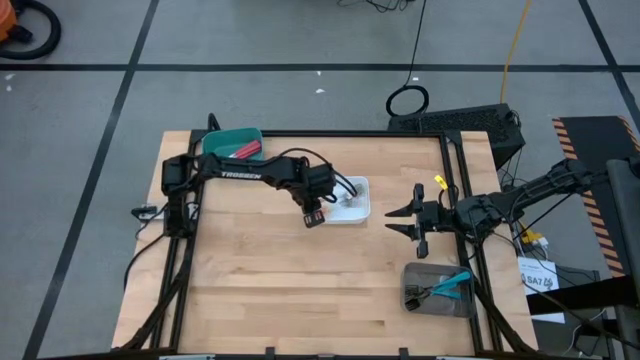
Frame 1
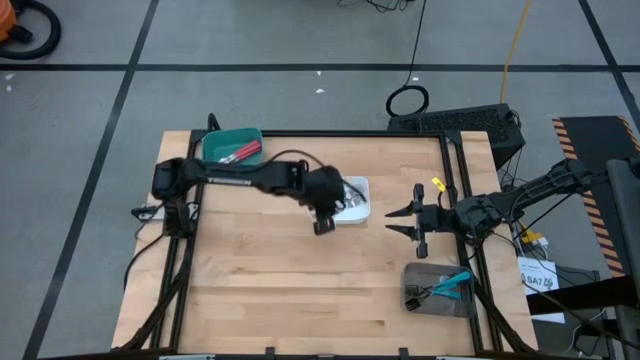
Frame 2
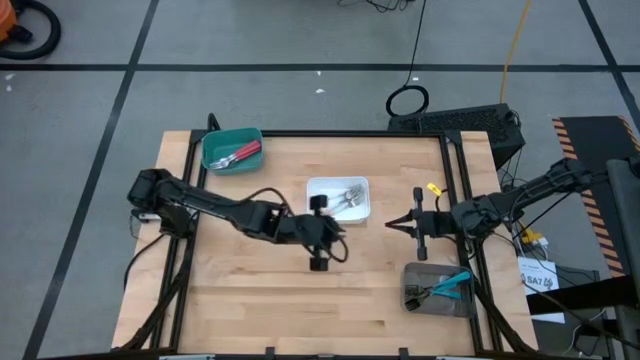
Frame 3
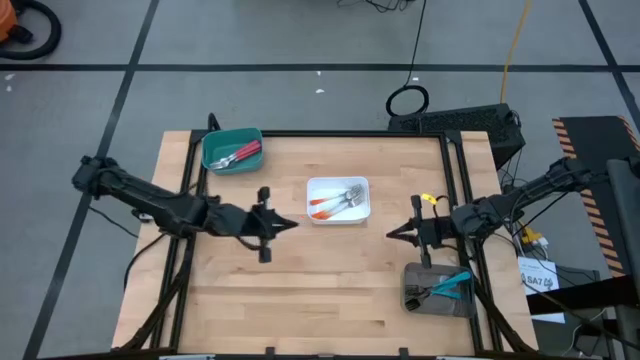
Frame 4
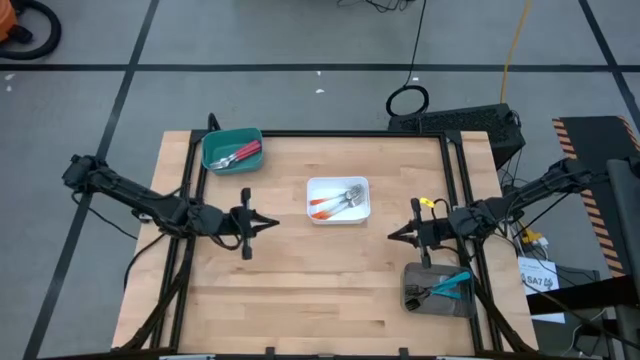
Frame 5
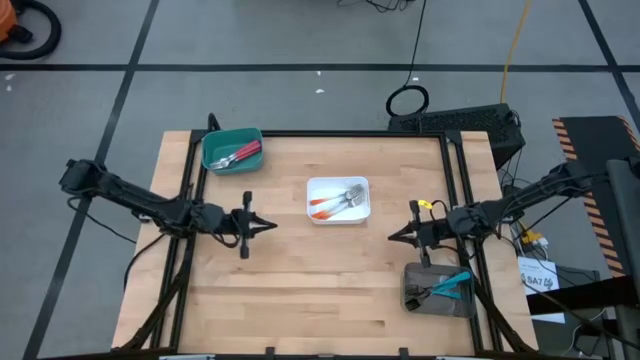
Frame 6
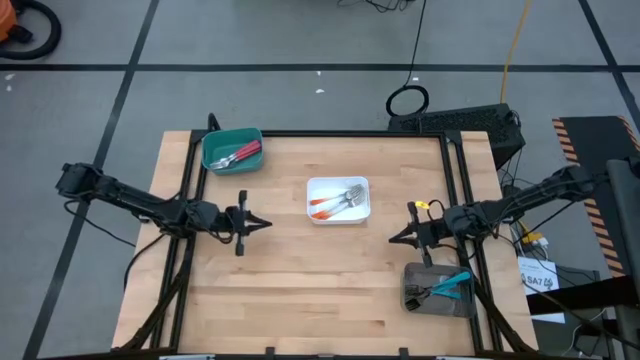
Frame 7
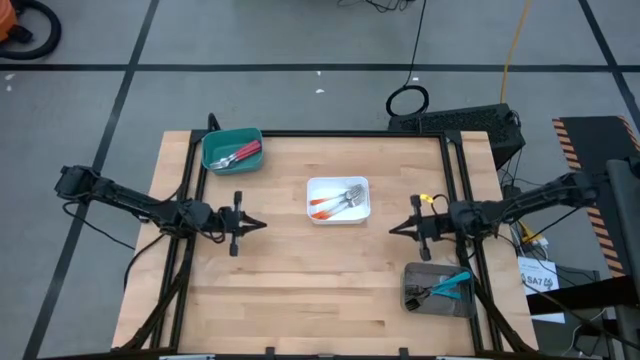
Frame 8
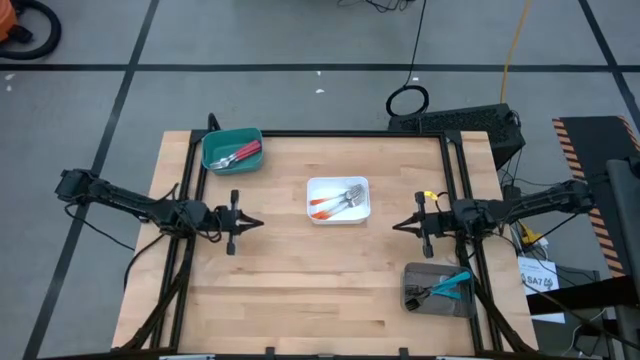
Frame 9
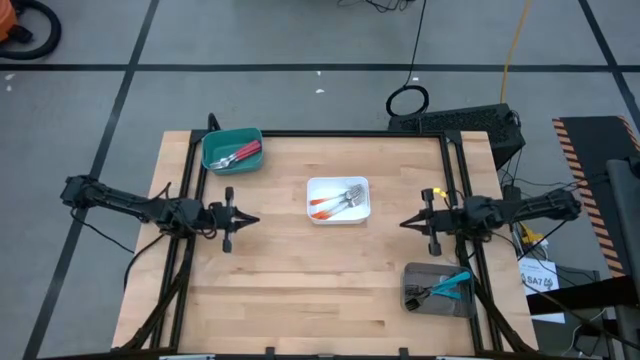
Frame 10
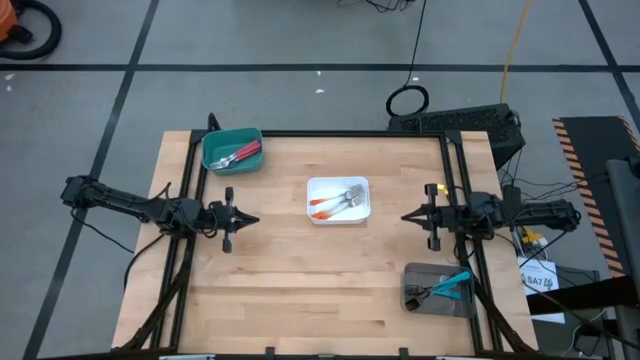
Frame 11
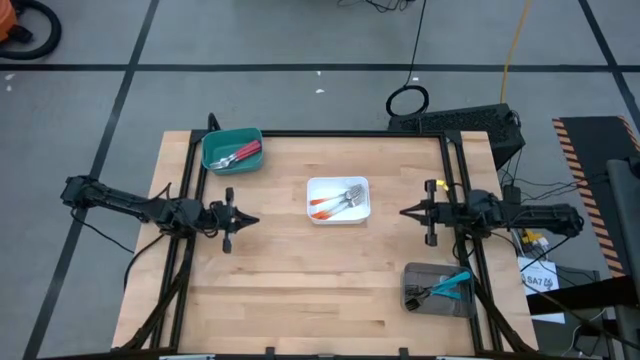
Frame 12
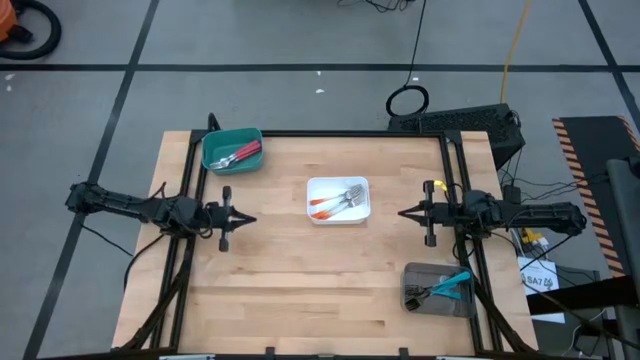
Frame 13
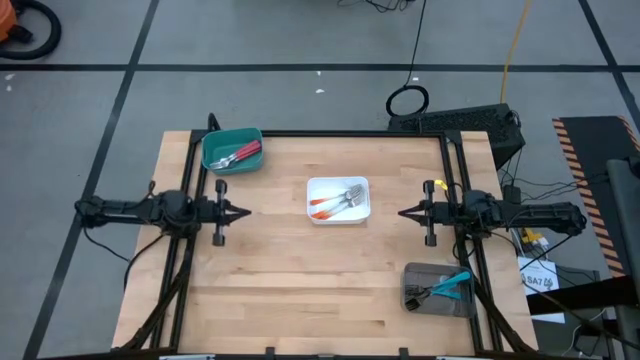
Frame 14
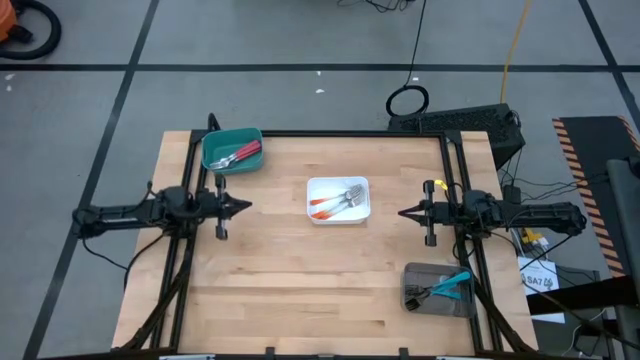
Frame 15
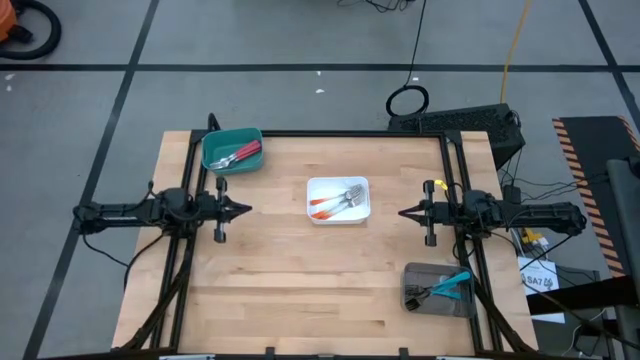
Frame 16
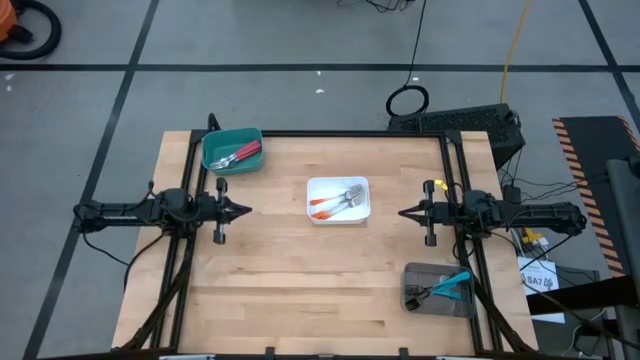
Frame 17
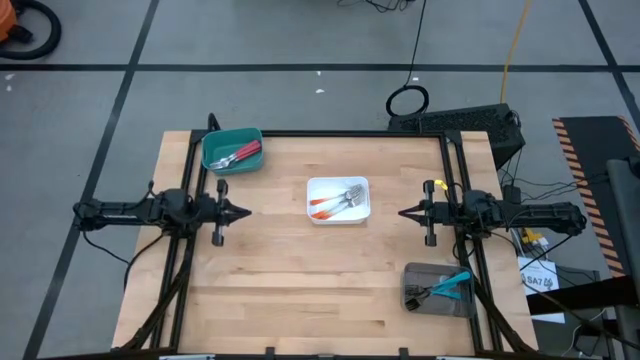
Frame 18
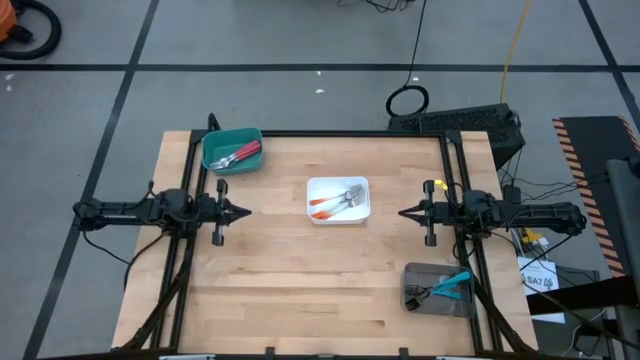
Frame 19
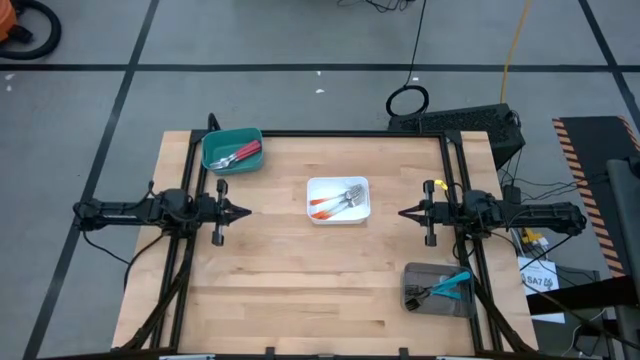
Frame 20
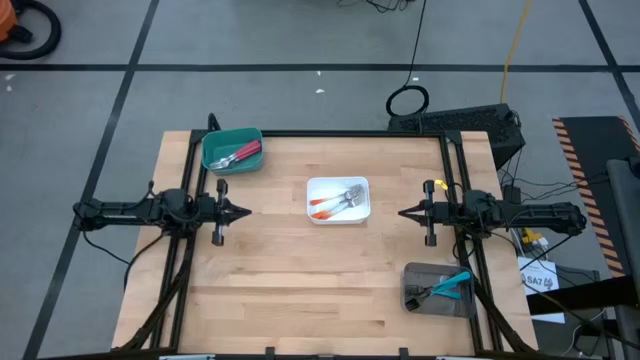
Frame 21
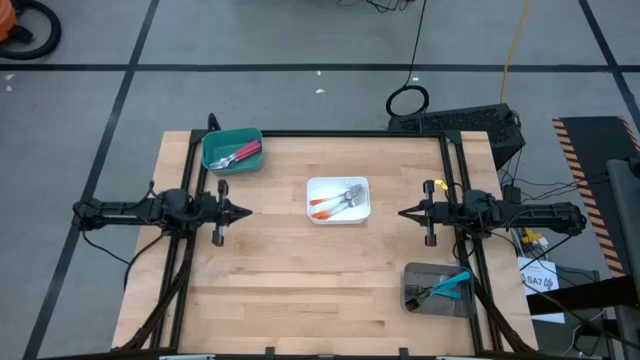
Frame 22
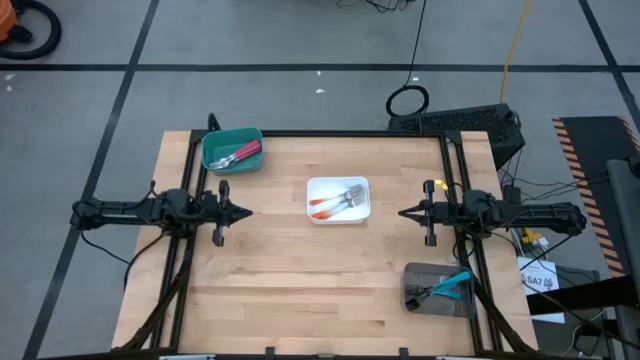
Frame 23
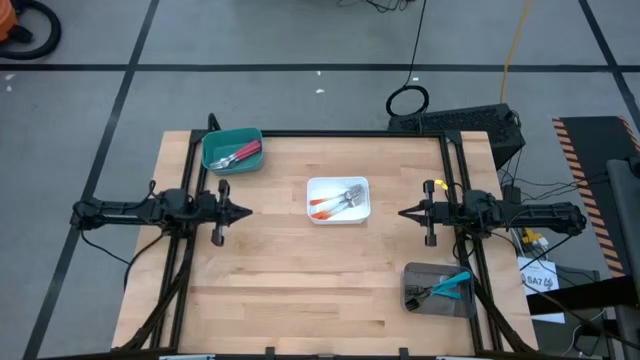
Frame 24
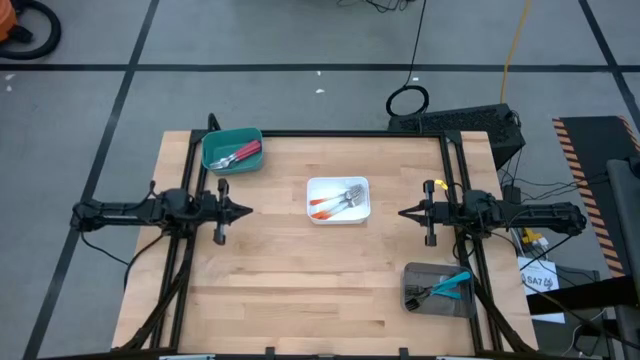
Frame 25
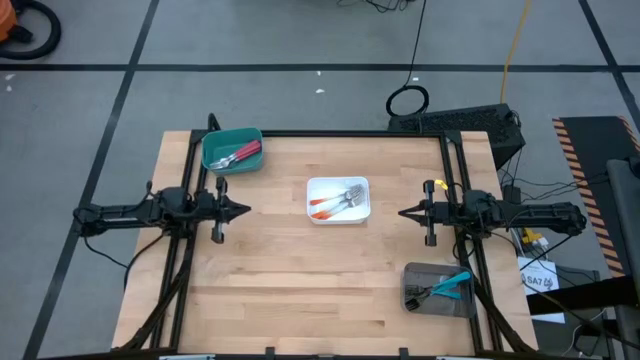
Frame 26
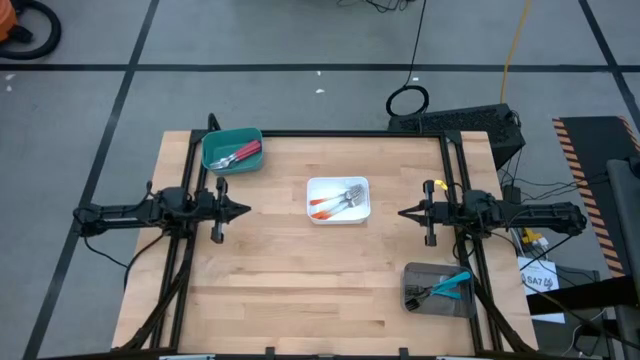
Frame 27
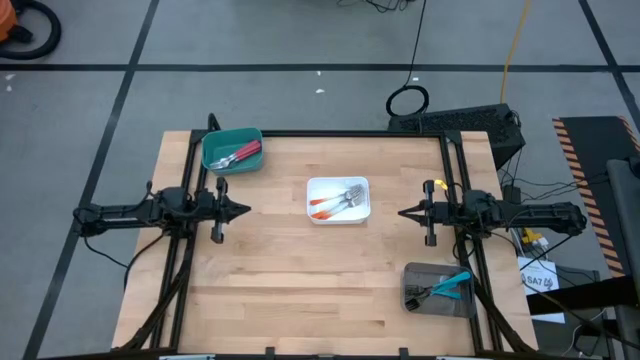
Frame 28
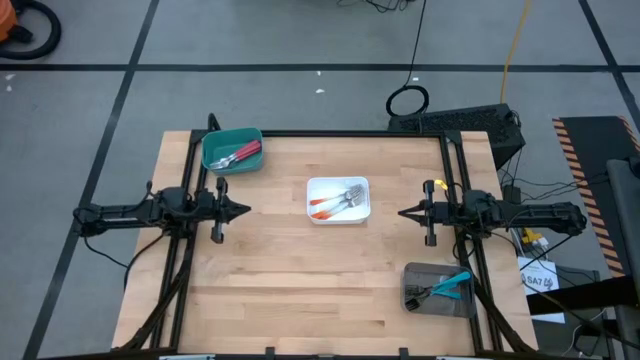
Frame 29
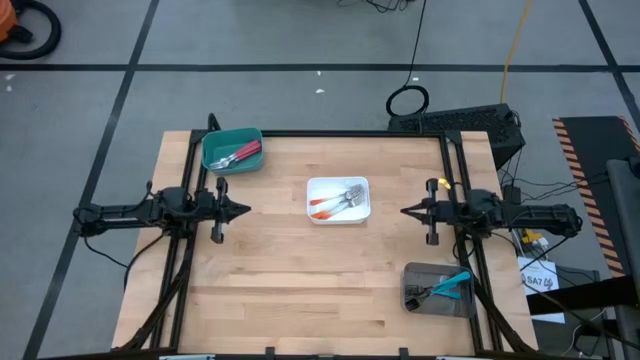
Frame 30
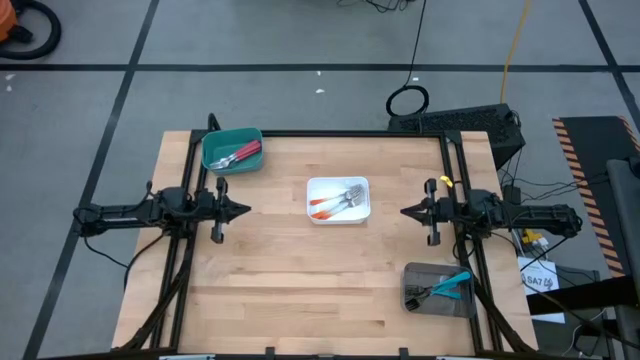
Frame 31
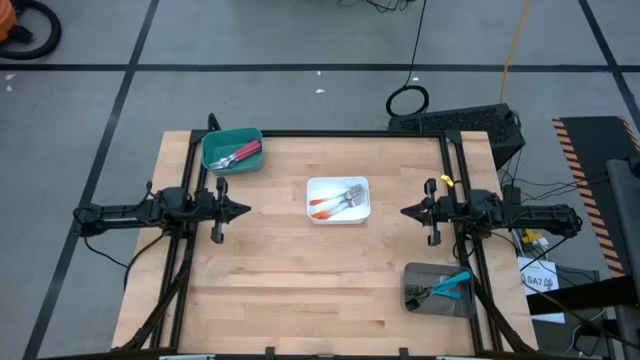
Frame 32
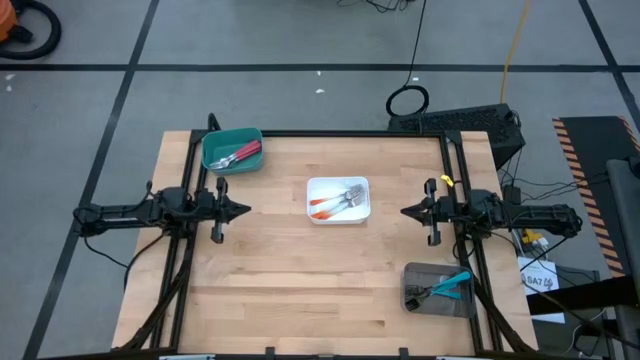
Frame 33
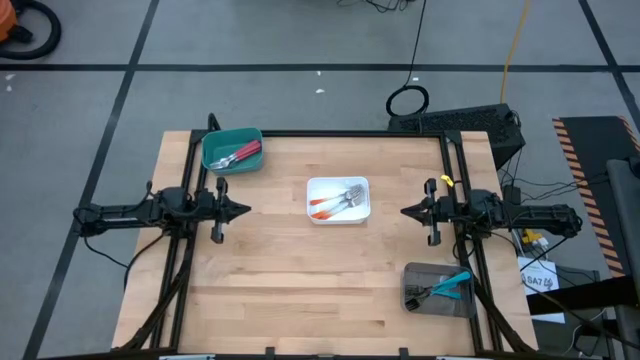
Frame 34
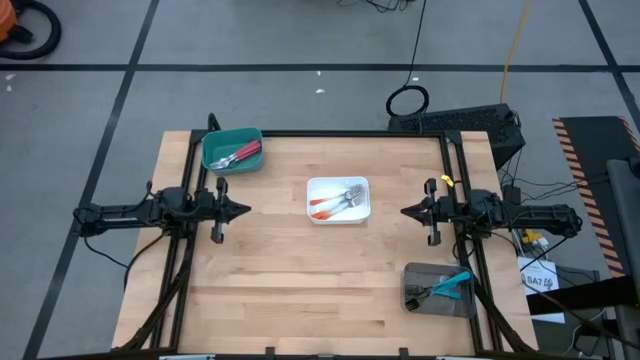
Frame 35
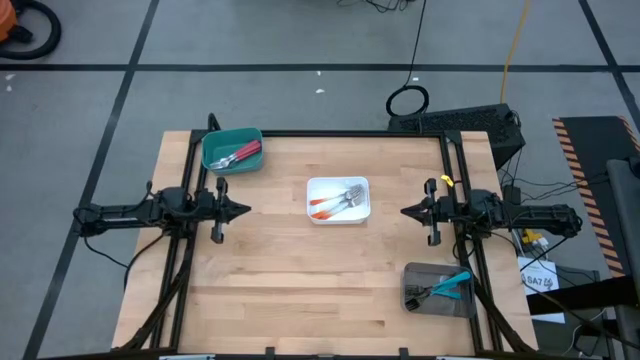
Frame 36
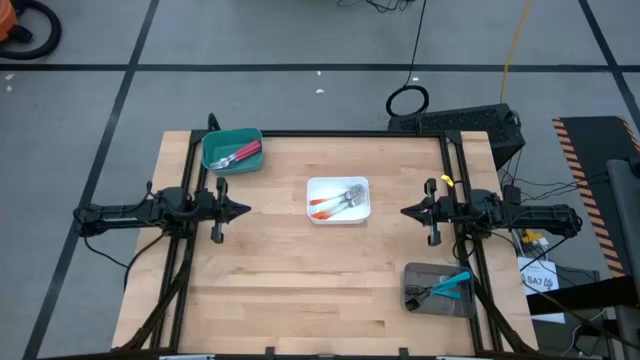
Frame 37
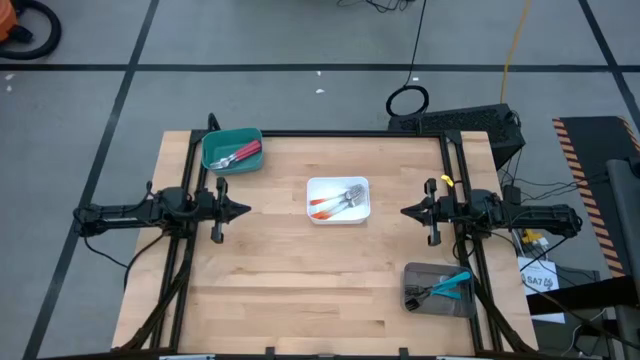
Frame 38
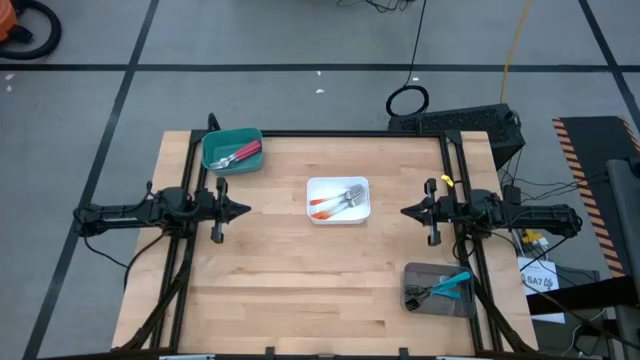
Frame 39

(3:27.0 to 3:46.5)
Task: Sort silverware by color (type)
Return to Home Position

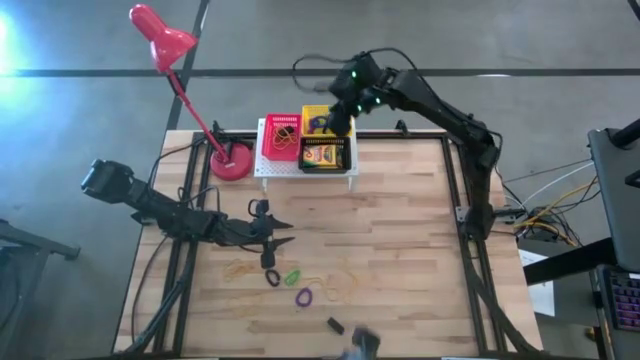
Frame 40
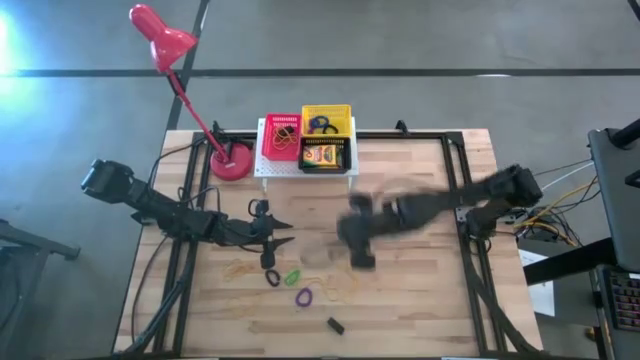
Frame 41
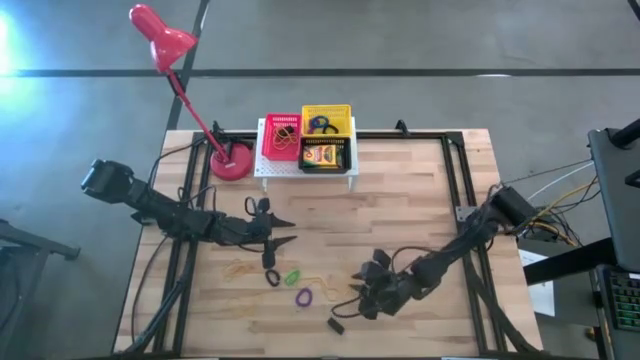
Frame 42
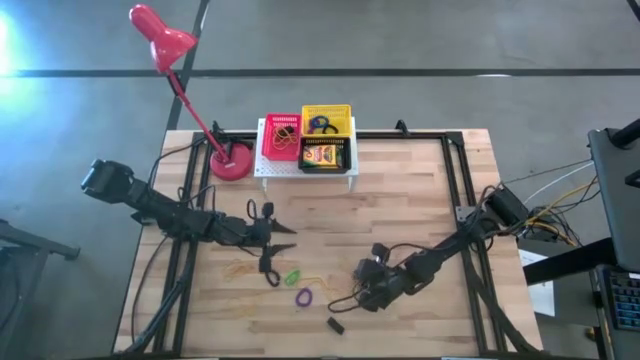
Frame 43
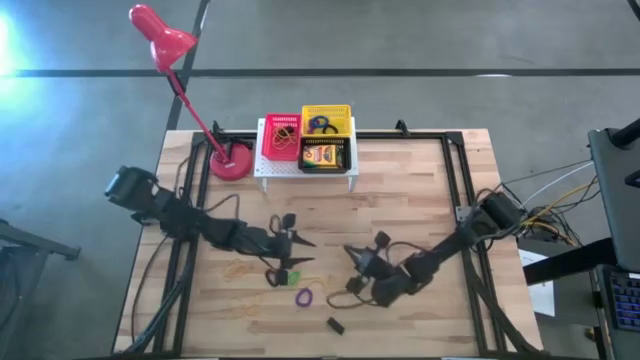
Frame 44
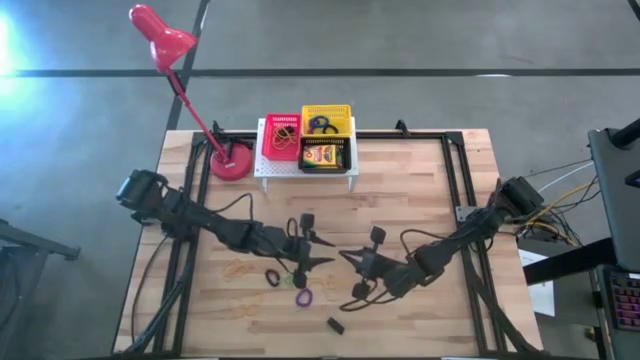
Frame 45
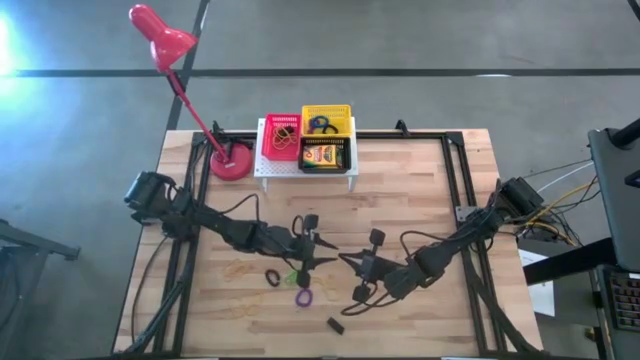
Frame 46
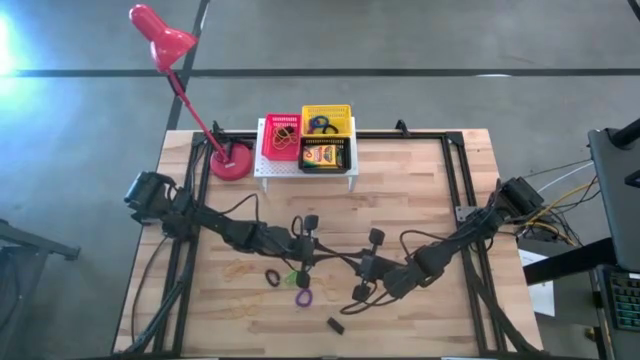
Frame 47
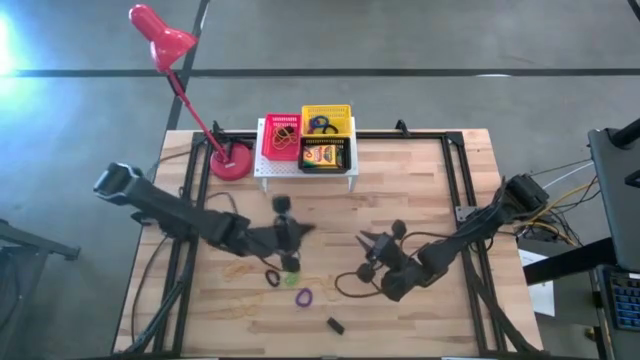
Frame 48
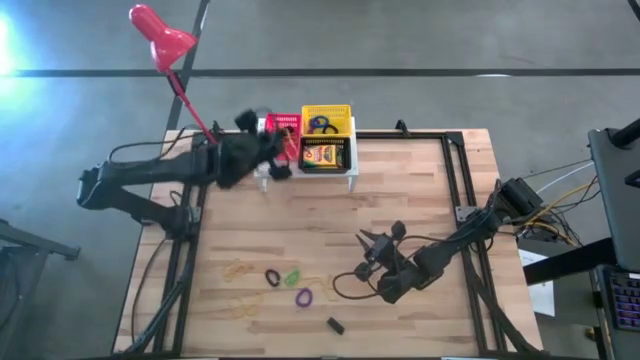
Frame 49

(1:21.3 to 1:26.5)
Task: Pick & Place Office Desk Supplies
Put the yellow rubber band into the red bin on the shelf
